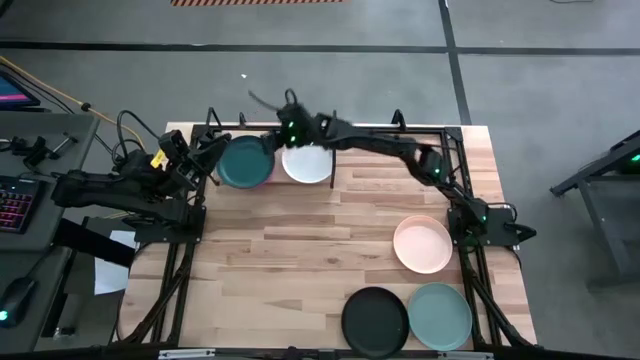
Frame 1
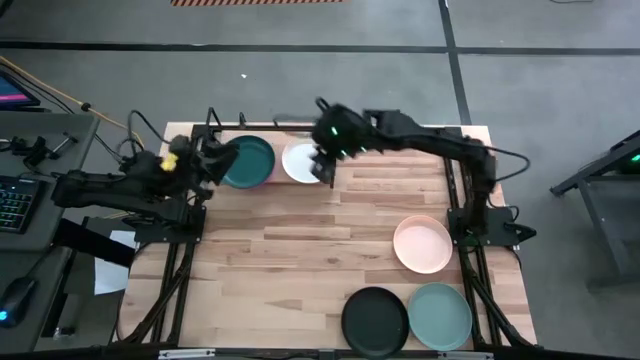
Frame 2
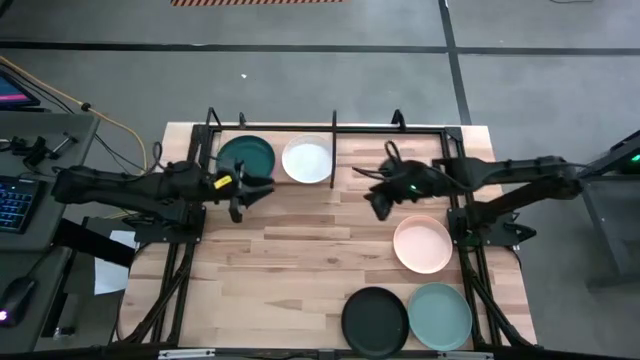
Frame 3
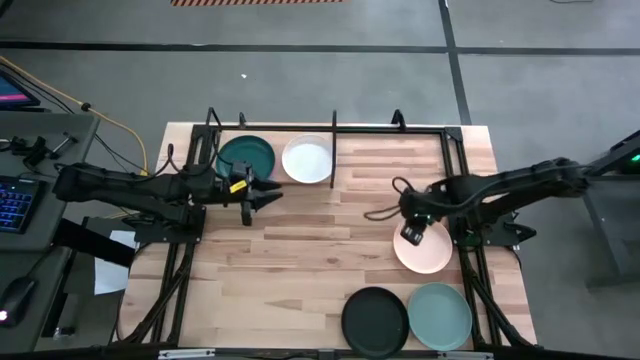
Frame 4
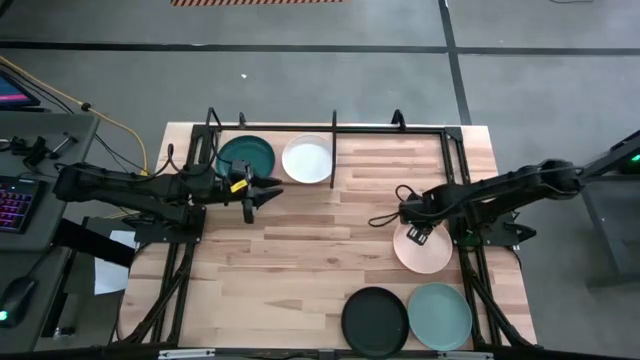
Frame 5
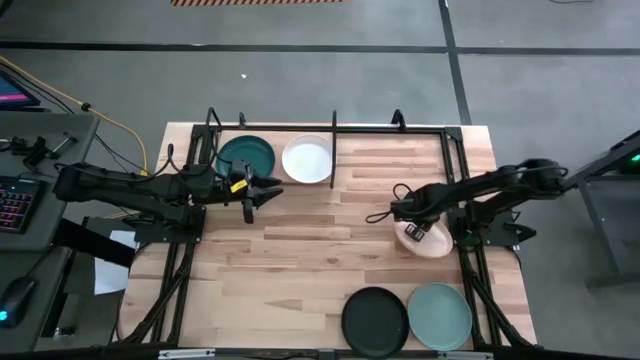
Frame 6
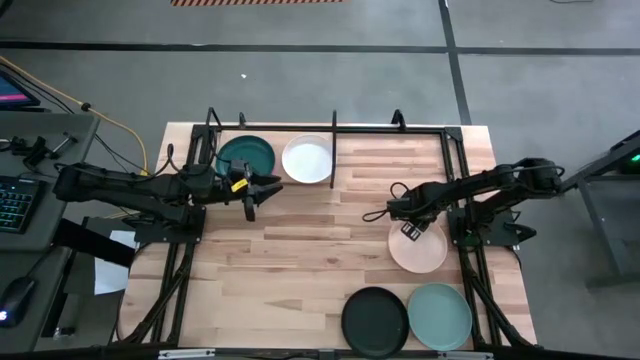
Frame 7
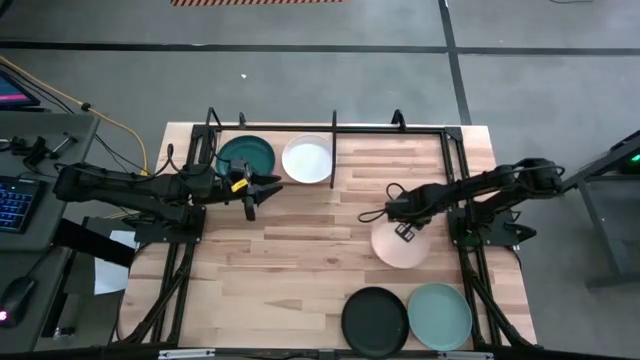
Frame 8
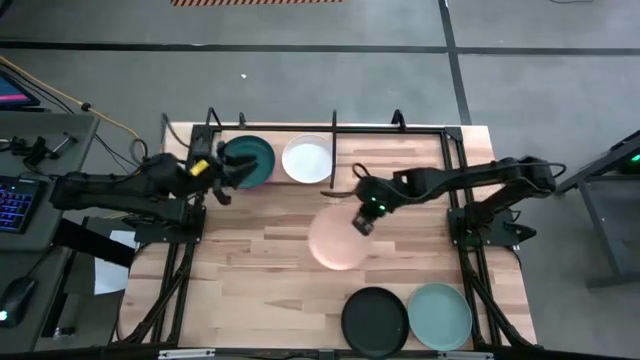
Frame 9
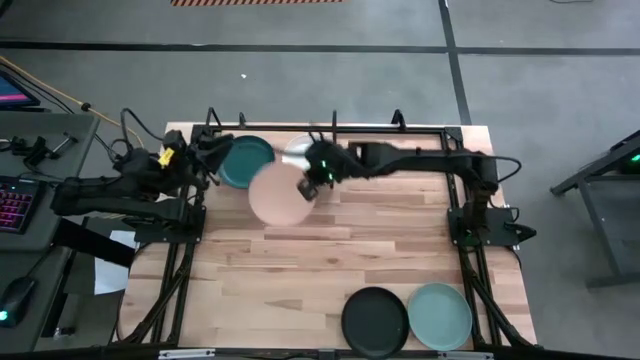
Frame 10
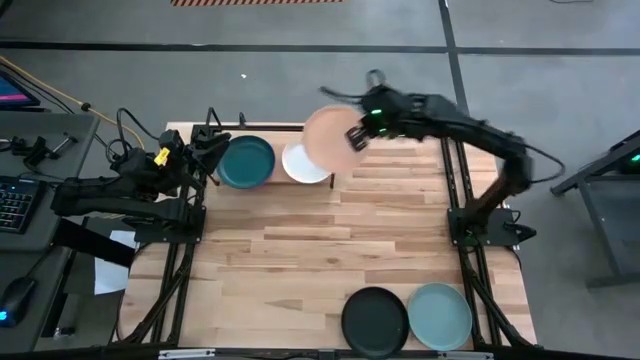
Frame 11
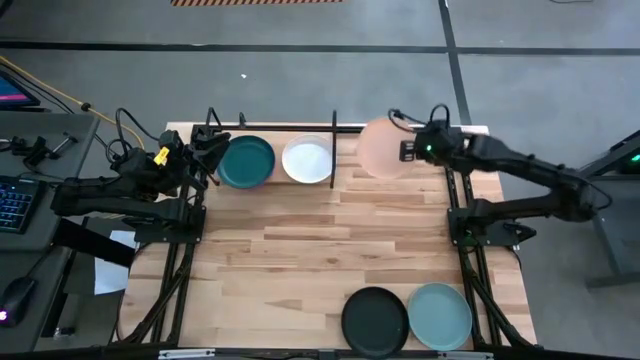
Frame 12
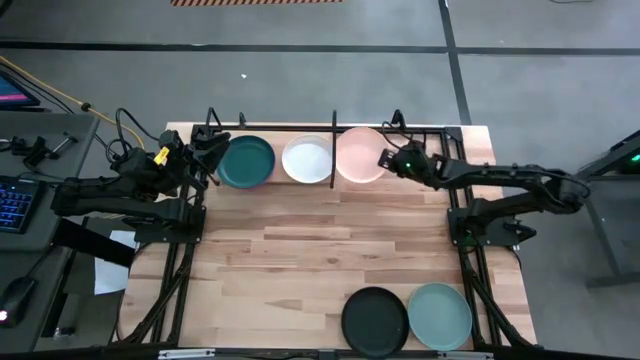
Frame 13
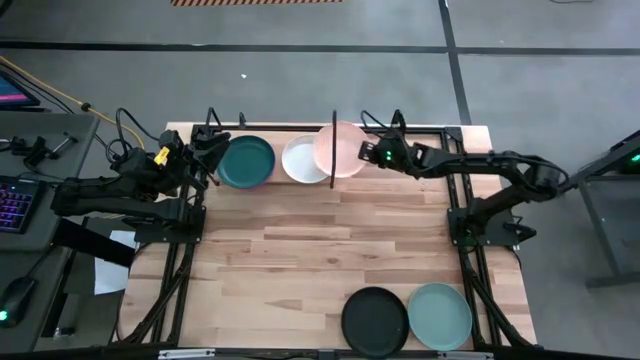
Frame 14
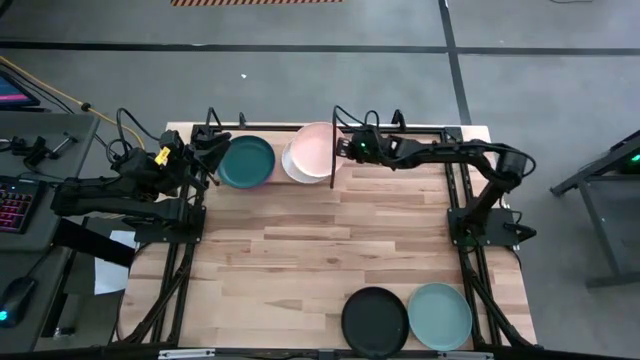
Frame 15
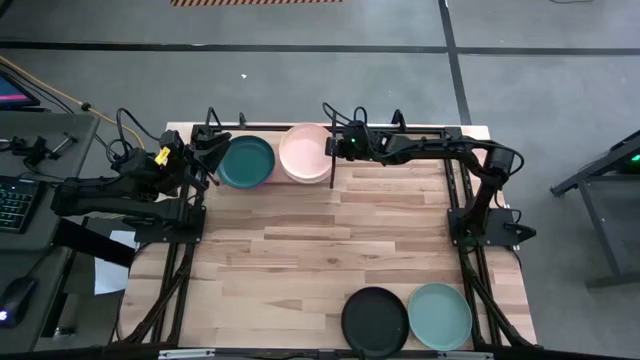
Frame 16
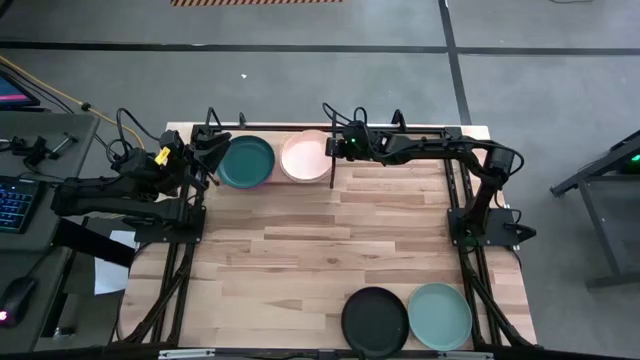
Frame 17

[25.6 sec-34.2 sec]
Task: Place and stack plates onto a shelf
Stack the light orange plate on top of the white plate on the shelf

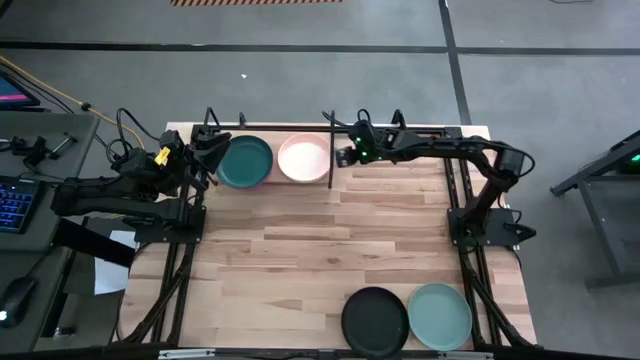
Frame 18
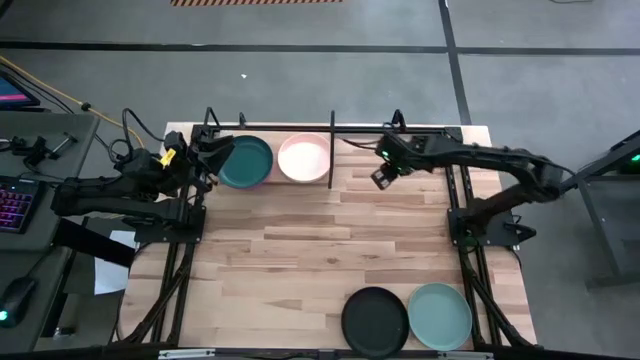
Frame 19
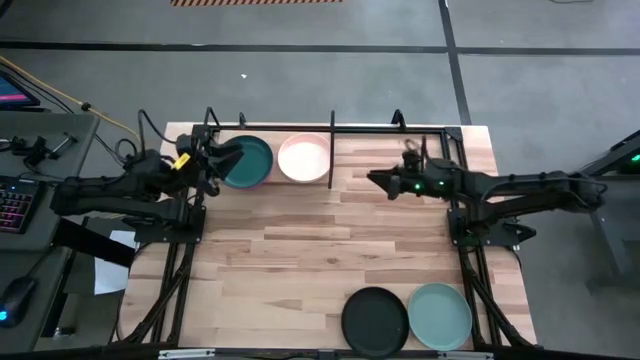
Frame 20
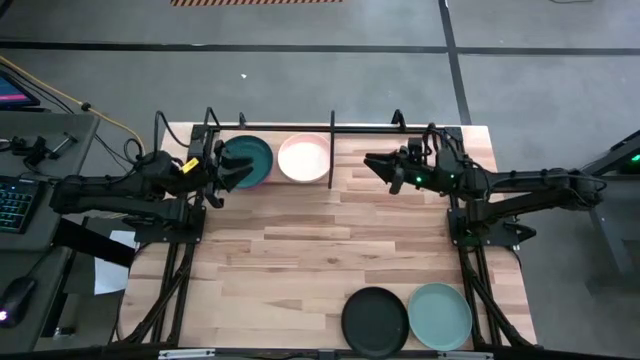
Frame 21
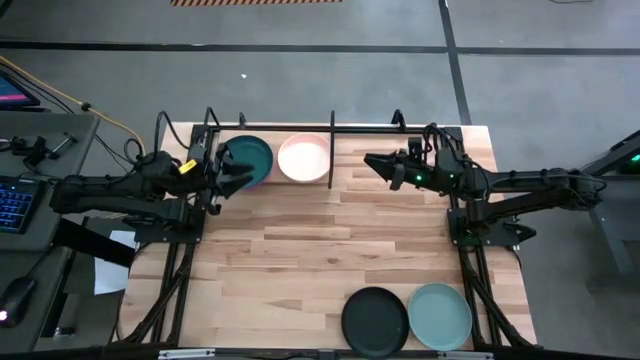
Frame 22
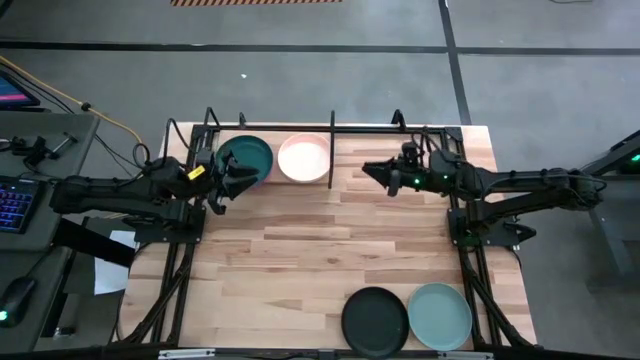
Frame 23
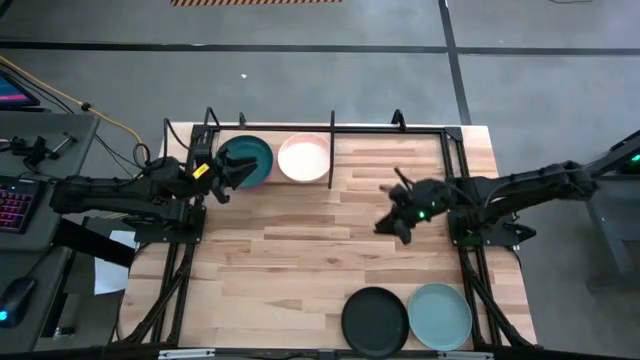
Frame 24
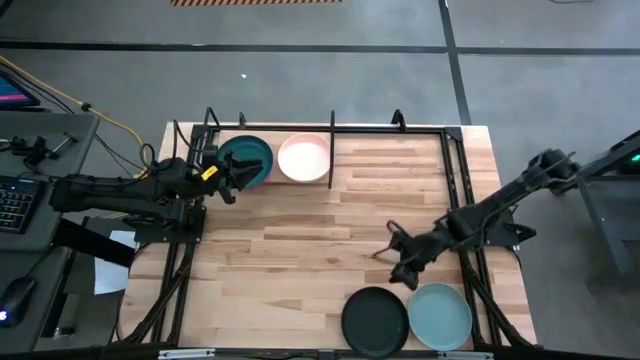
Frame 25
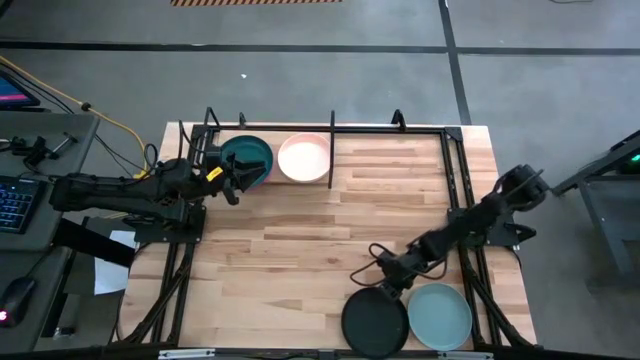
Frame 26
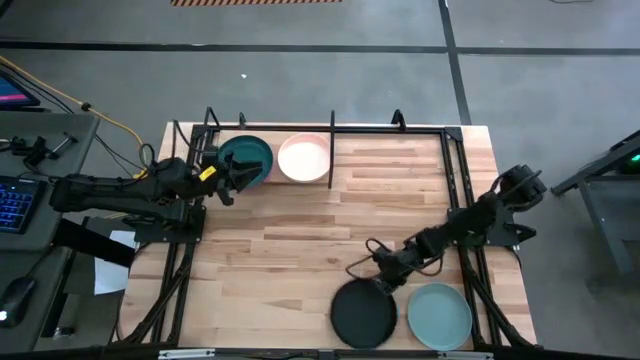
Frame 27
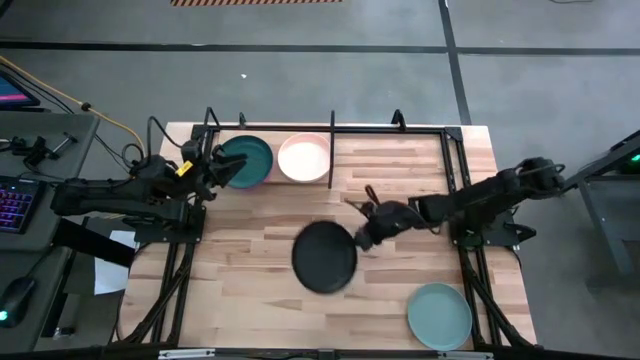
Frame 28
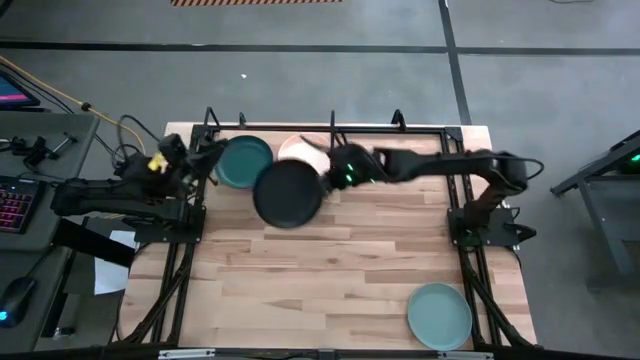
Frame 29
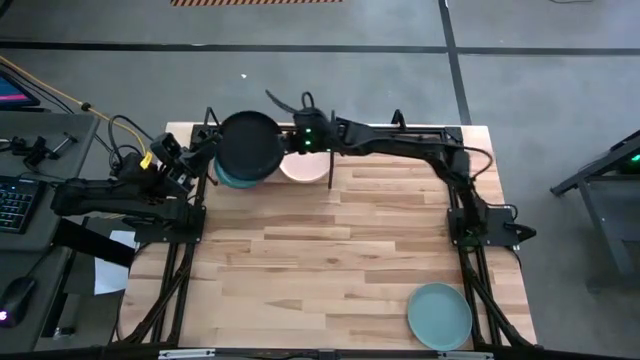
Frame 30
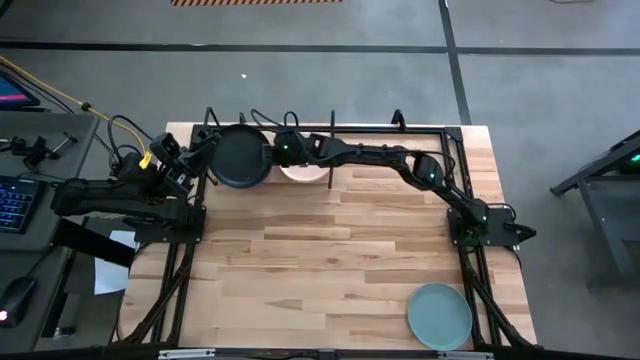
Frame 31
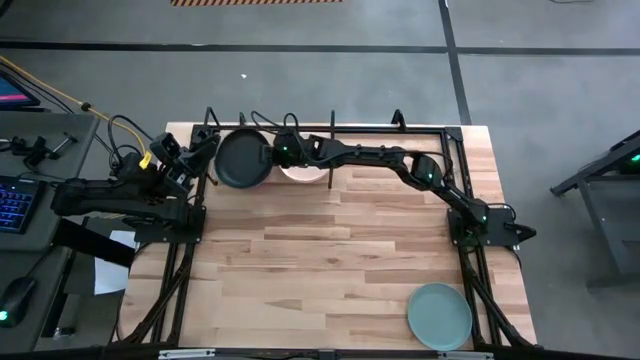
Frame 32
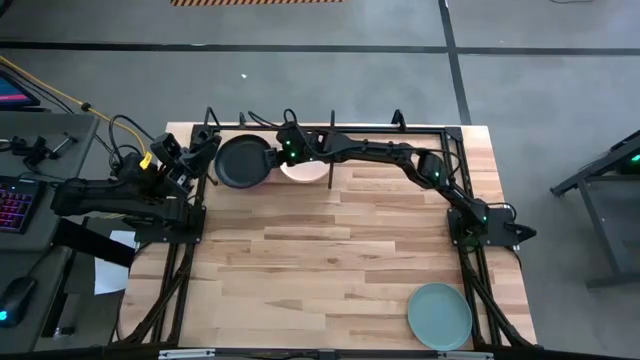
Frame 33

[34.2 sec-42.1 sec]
Stack the black plate on top of the dark green plate on the shelf

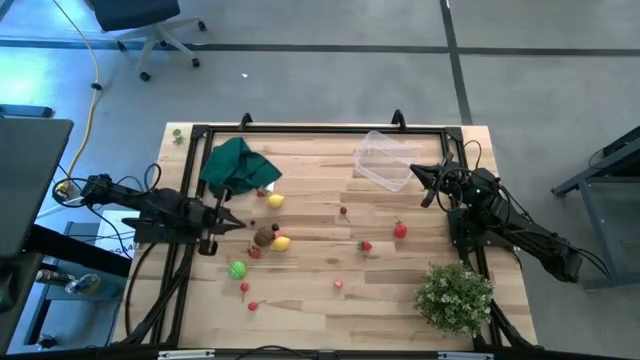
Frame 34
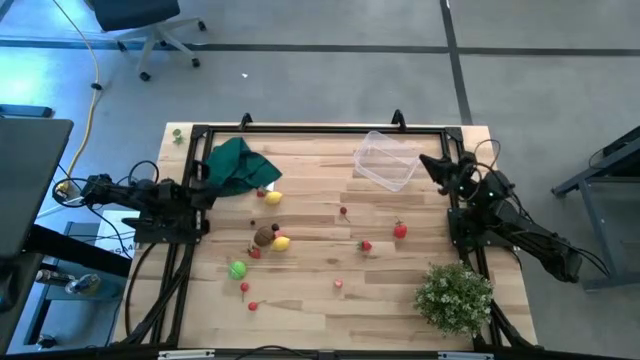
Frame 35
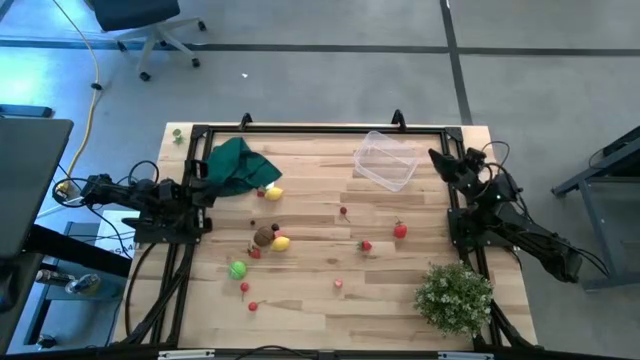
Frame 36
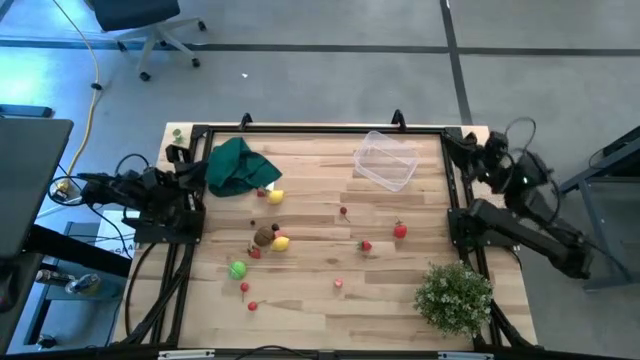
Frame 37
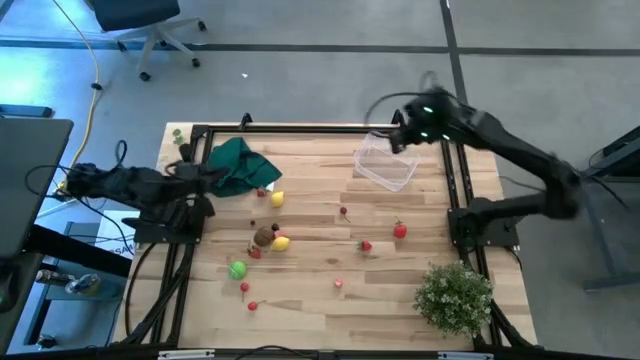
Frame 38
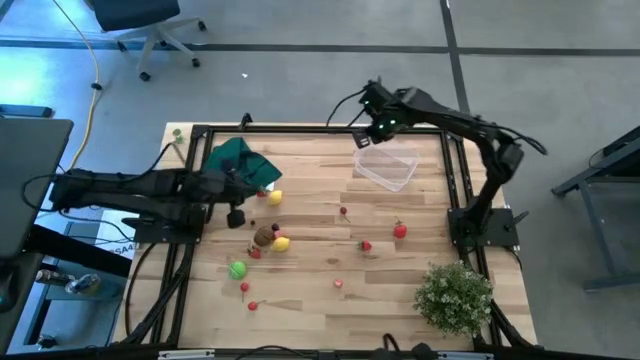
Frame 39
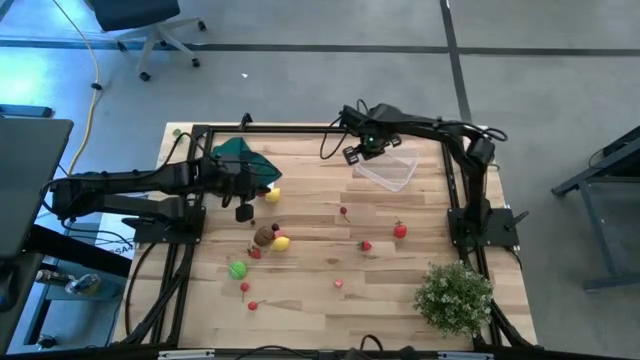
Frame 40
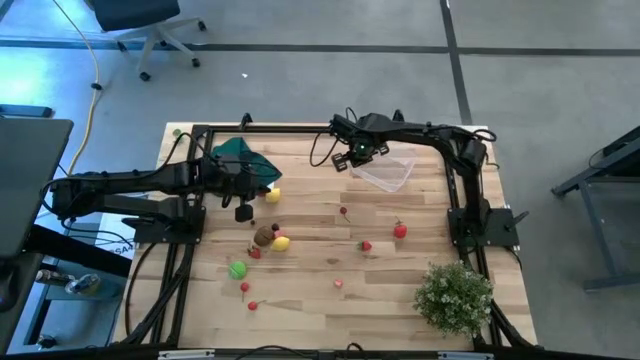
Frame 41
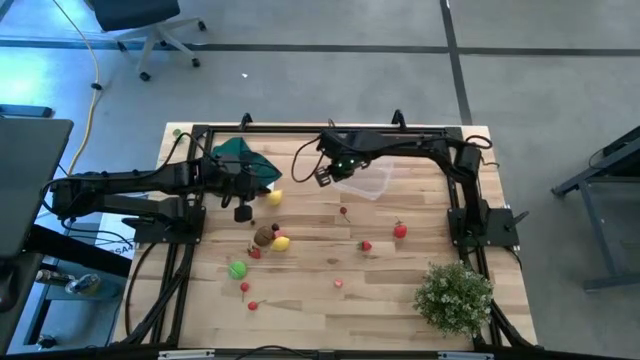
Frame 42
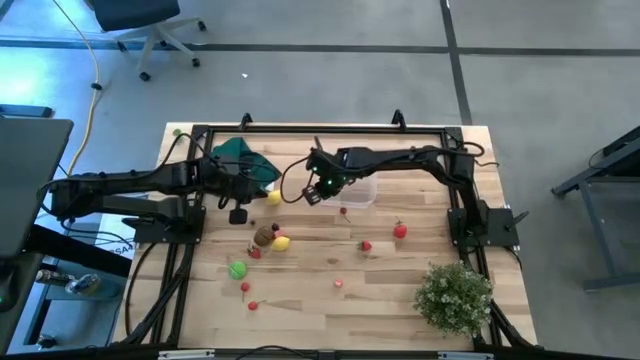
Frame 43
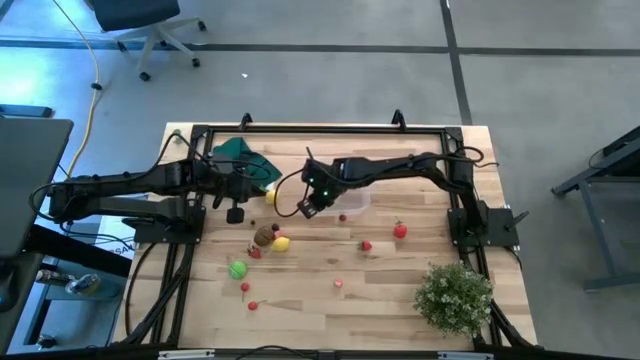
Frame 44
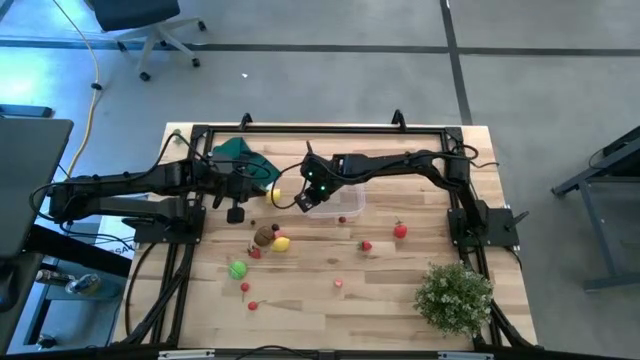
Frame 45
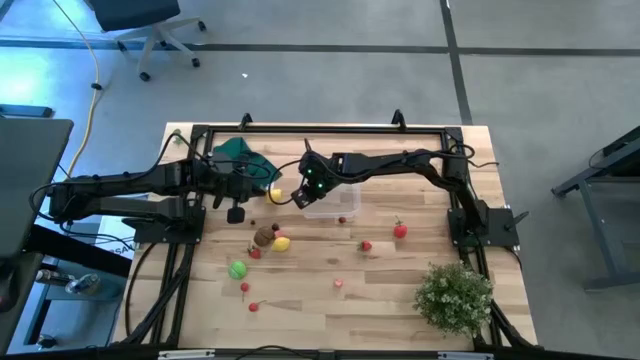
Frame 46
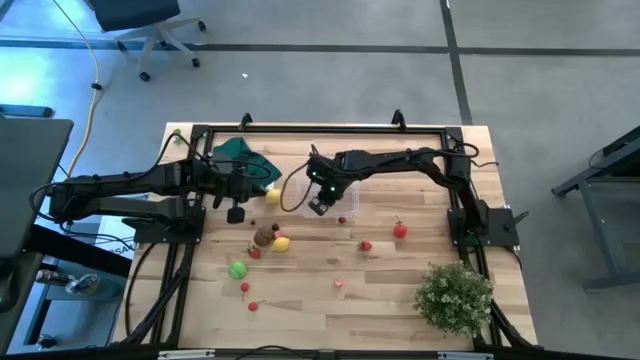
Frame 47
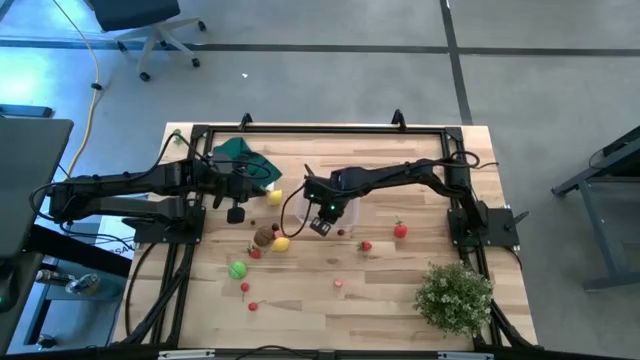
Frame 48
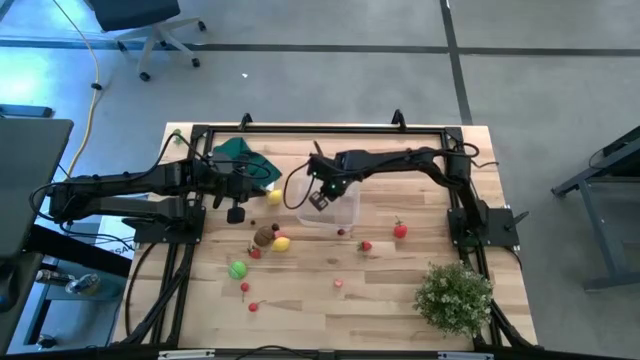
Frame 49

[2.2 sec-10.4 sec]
Task: Pick and placing Produce into tupperware
Move the transparent bin to the center of the table
